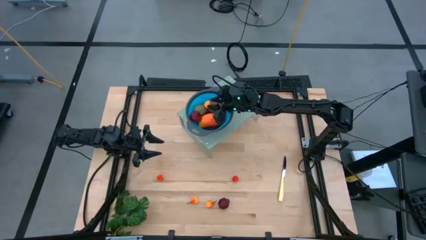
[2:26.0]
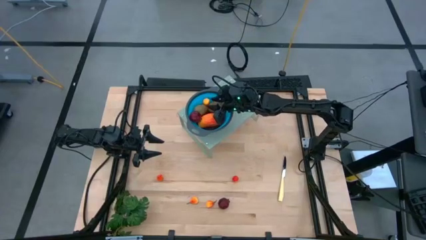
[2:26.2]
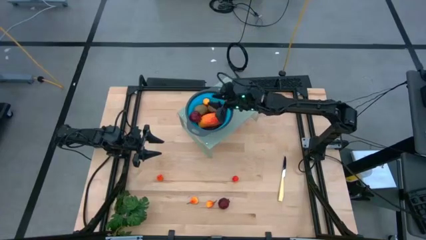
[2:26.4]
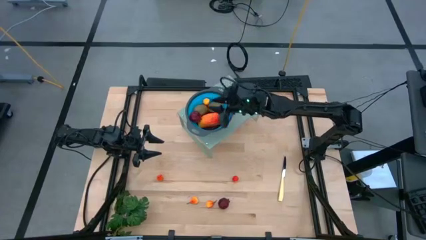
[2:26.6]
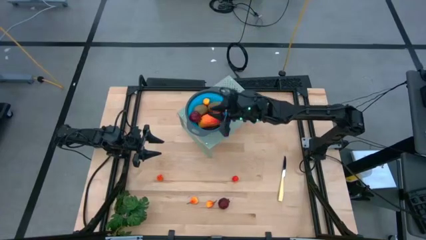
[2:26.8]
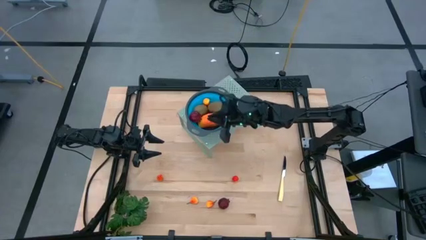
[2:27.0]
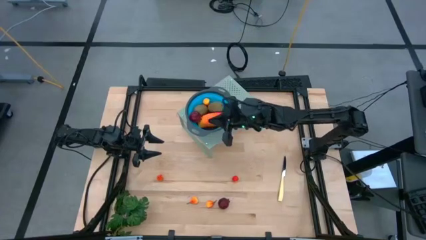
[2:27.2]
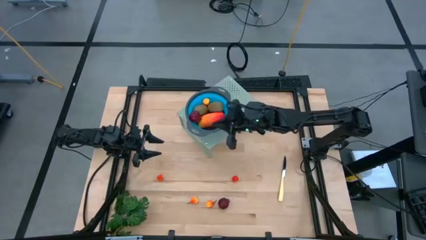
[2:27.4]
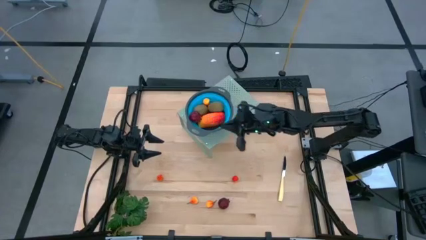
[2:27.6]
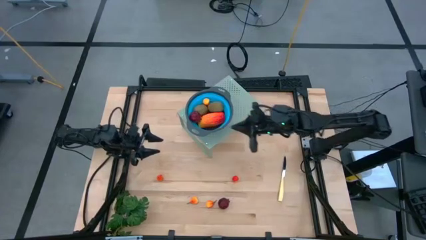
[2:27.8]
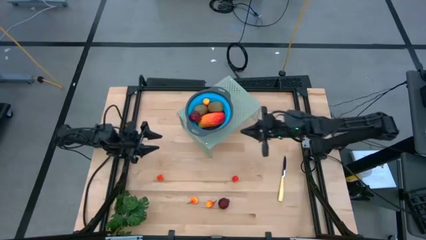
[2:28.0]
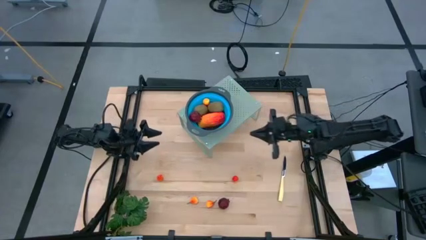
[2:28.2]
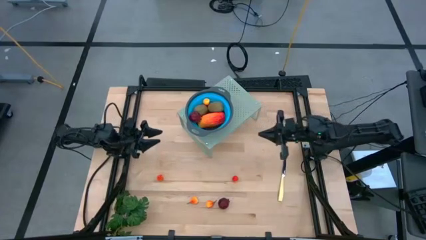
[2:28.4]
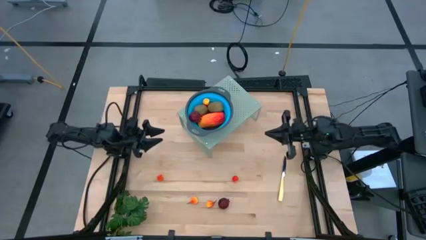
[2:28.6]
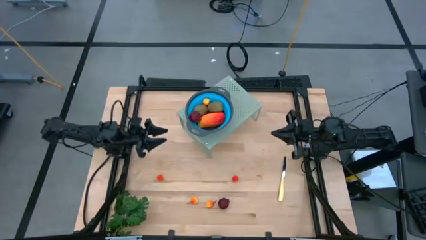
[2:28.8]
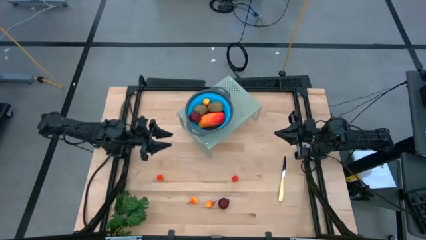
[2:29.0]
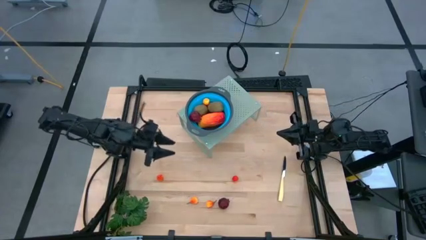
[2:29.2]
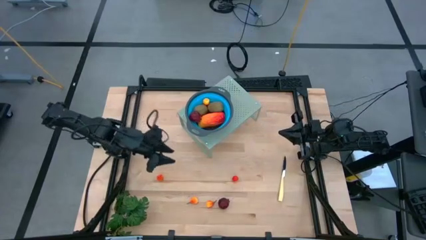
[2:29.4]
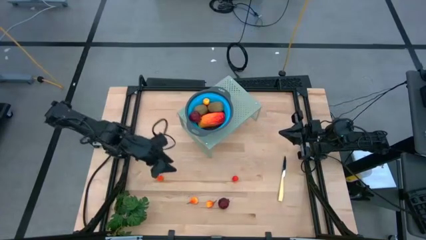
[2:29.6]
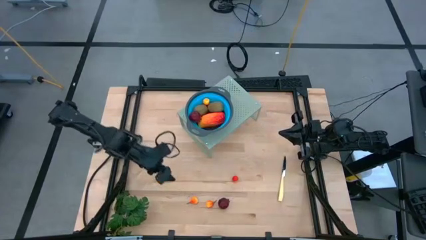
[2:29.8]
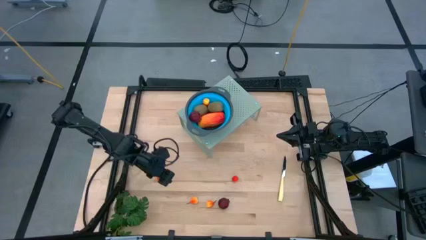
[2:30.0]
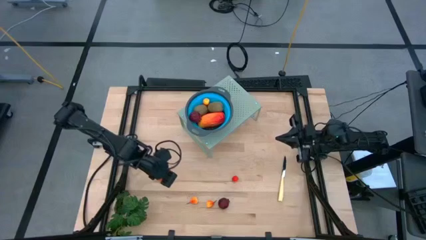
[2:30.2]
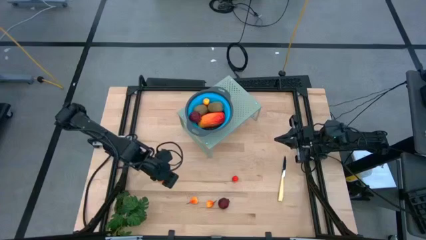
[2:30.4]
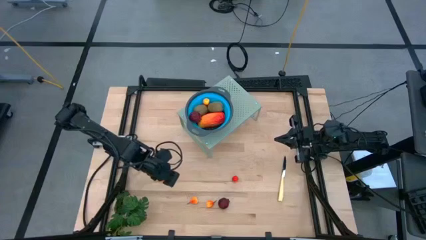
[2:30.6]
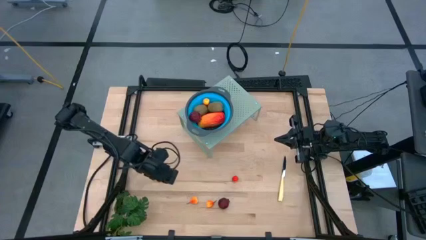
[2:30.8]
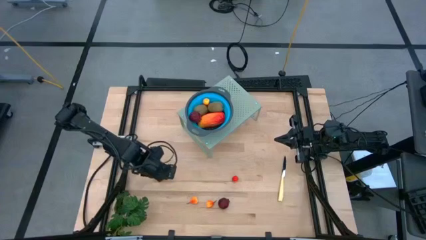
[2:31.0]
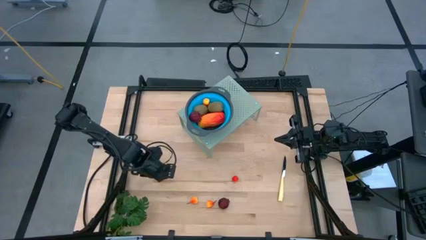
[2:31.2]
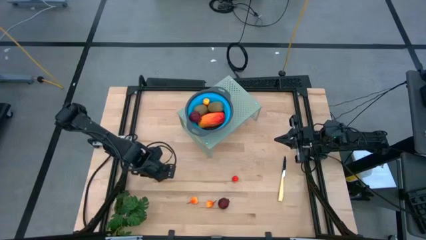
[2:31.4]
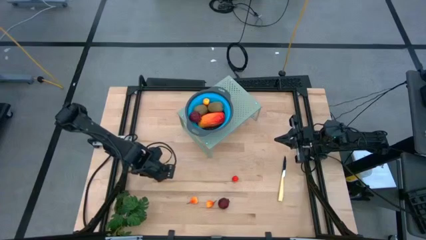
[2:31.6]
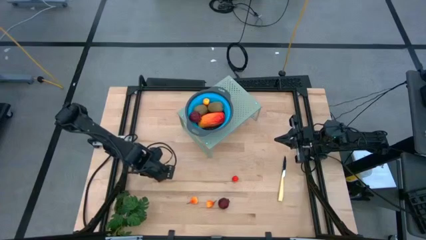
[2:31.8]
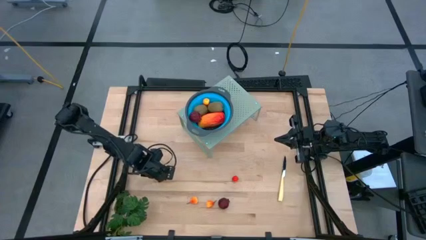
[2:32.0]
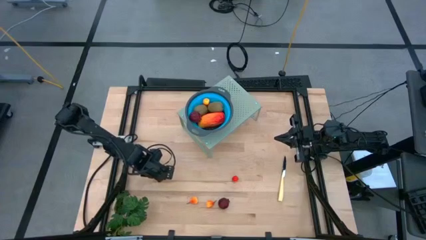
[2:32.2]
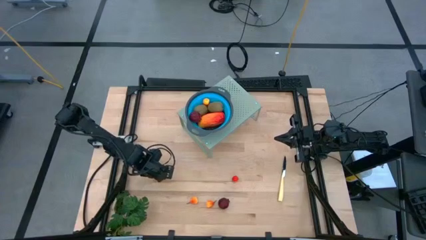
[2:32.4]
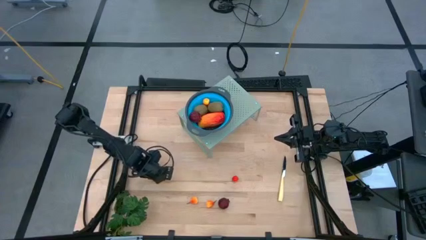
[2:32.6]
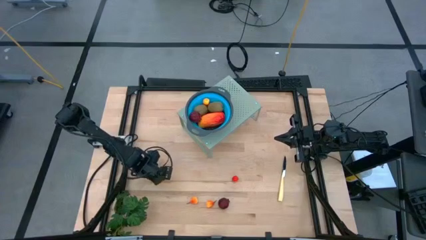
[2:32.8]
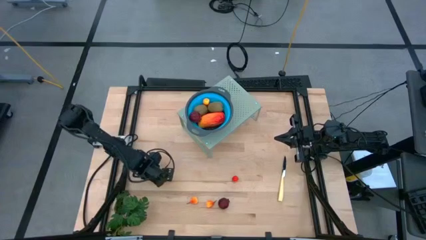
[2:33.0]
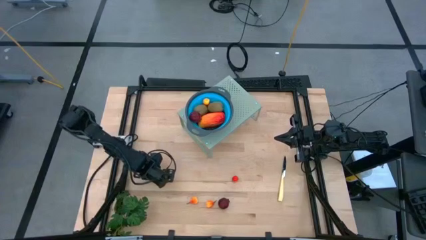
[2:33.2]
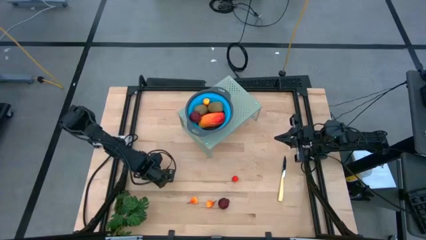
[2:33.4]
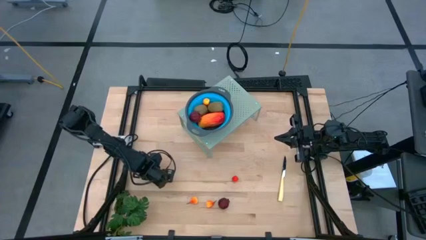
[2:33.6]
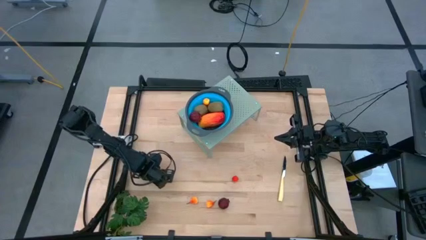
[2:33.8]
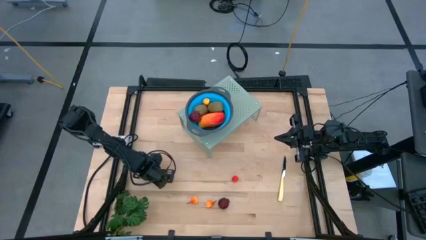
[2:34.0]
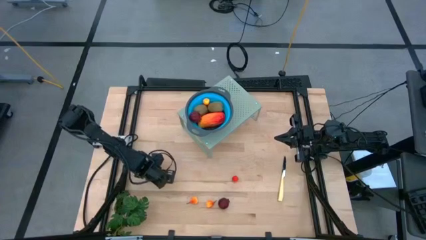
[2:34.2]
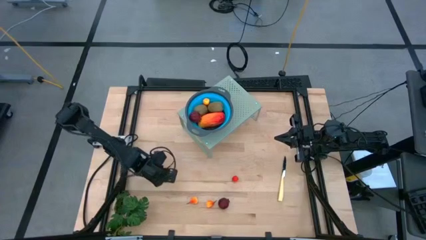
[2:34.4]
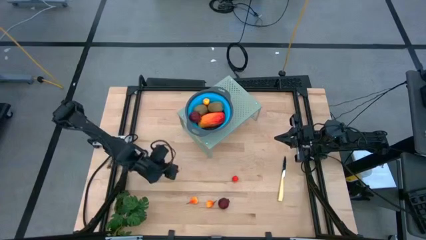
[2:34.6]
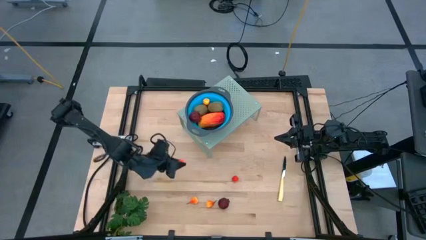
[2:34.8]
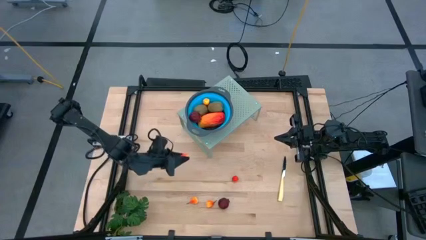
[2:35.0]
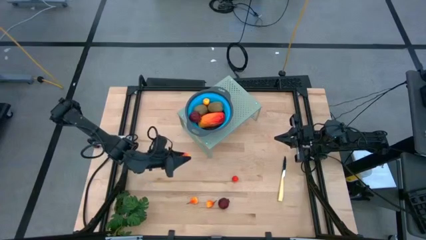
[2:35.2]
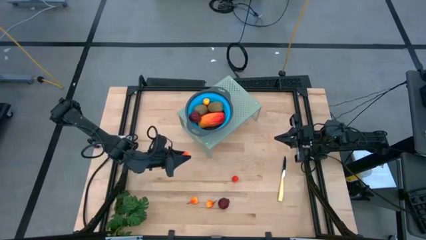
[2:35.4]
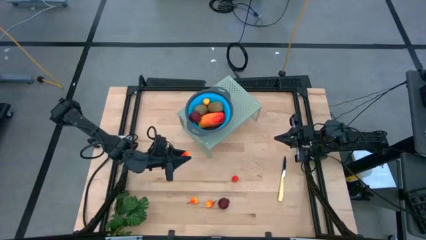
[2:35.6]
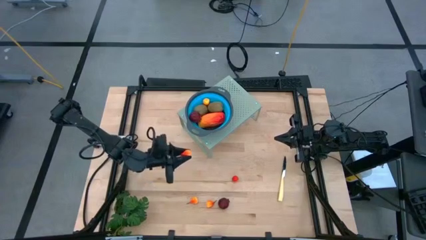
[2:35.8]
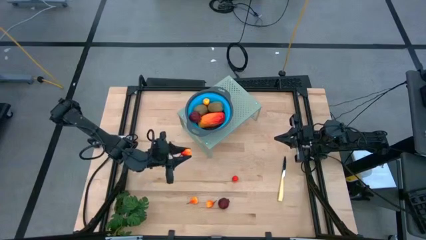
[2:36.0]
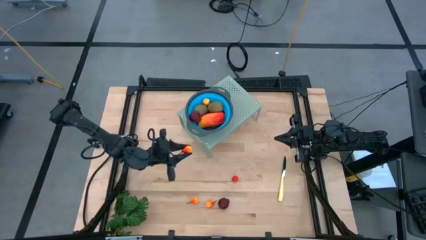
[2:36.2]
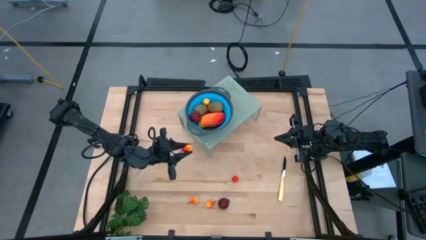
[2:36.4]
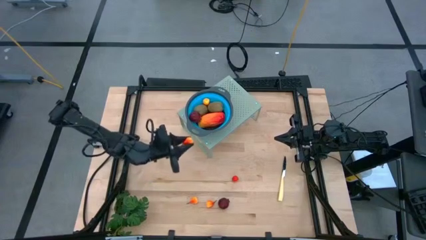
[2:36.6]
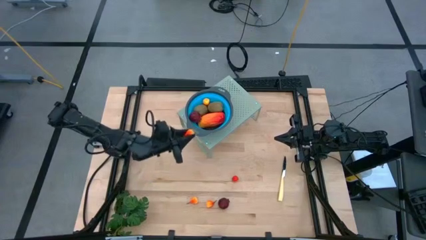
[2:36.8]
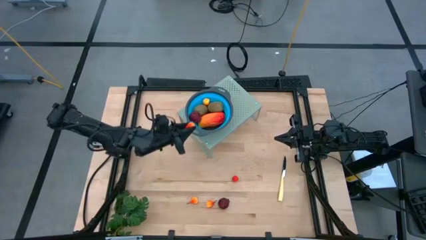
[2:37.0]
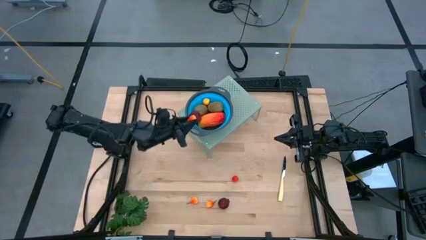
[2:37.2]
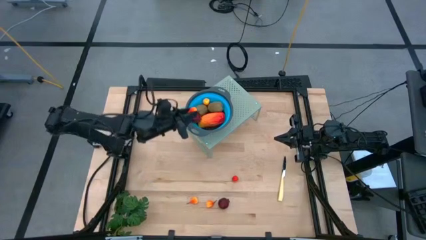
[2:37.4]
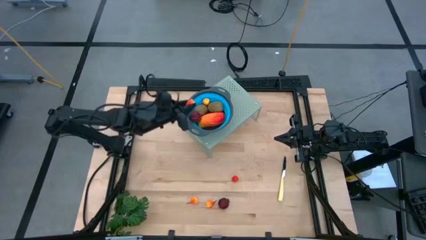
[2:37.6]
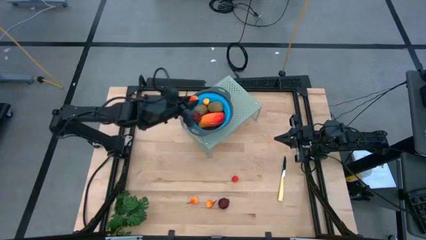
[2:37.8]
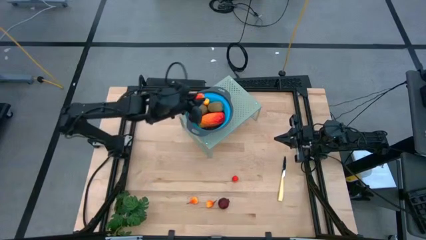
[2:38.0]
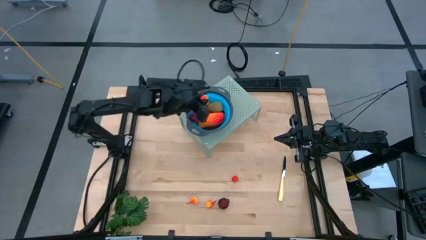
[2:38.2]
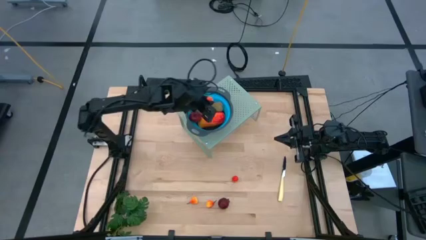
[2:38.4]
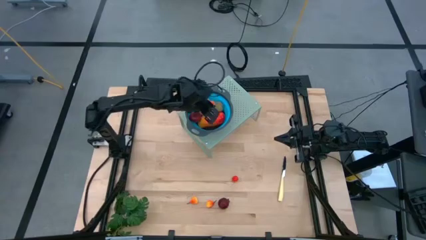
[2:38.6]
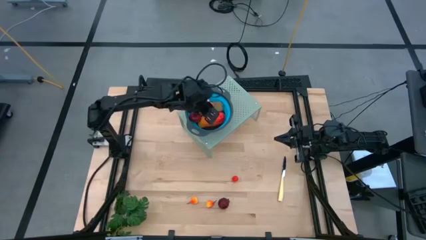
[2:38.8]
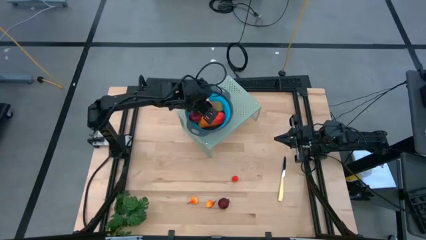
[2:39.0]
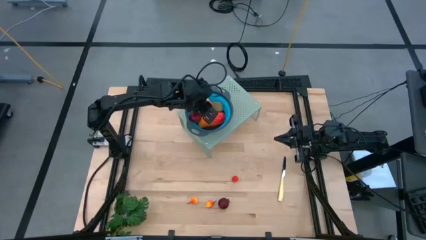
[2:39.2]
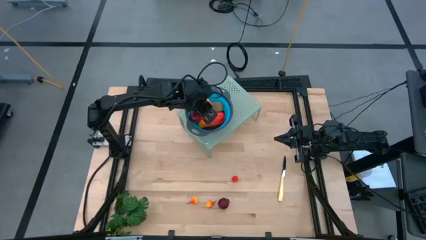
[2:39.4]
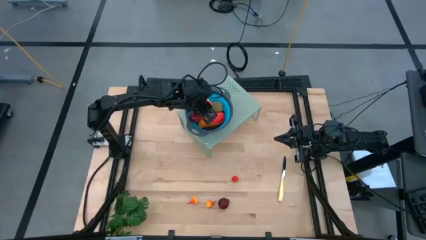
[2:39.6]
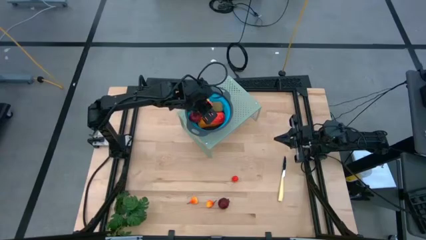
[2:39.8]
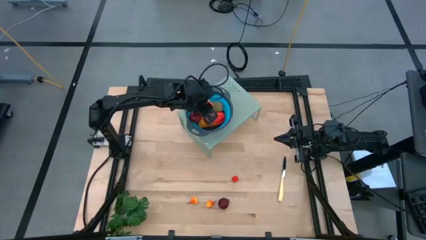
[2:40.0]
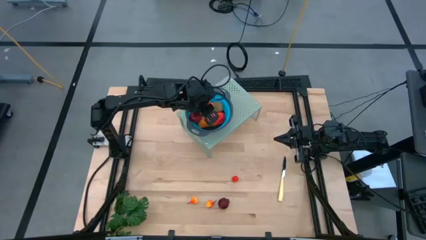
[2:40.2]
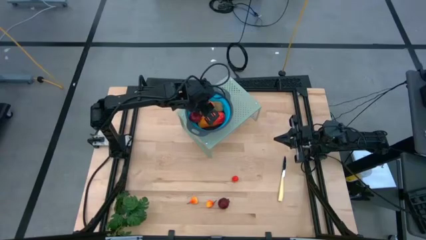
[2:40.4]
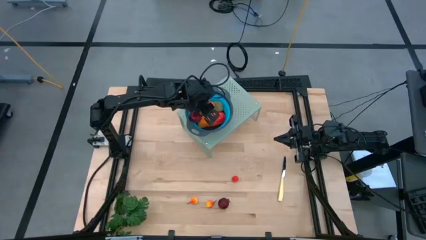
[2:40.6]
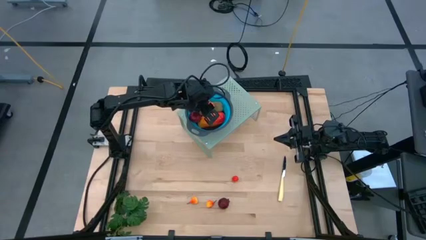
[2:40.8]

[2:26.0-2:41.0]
Task: Pick & Place Fruit
Put the red yellow peach into the blue strainer bowl on the shelf
